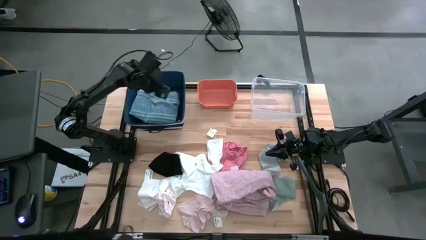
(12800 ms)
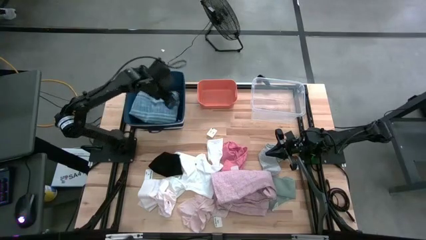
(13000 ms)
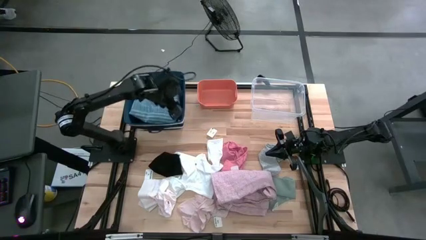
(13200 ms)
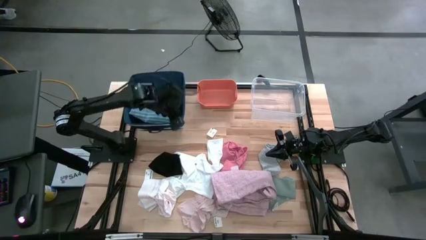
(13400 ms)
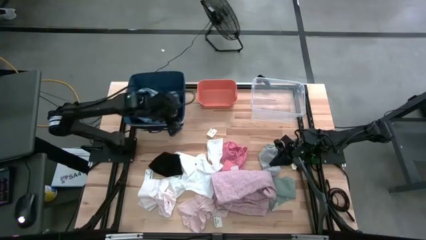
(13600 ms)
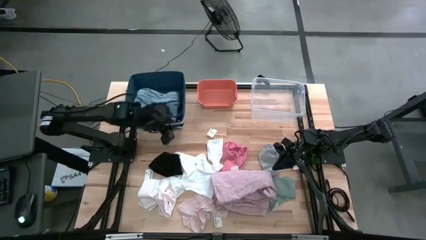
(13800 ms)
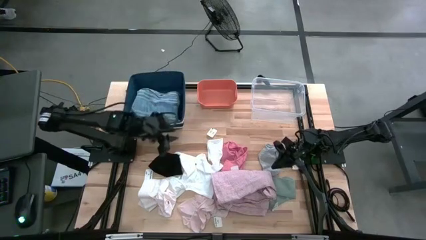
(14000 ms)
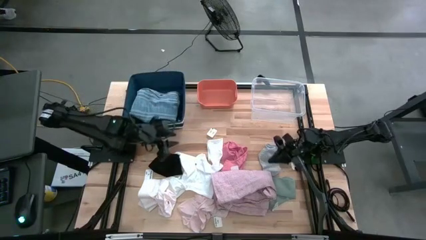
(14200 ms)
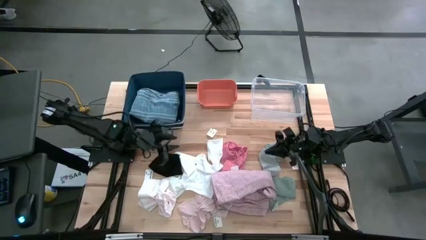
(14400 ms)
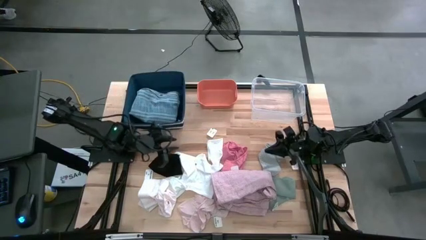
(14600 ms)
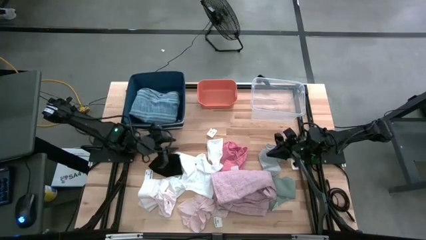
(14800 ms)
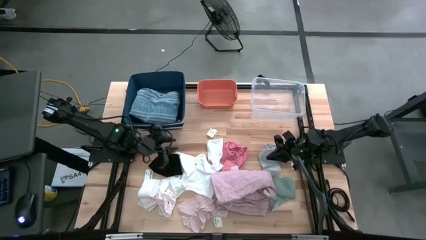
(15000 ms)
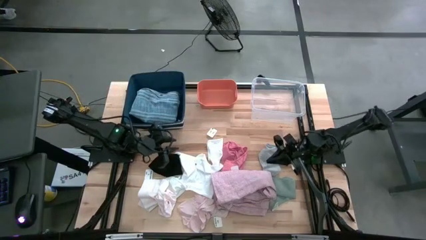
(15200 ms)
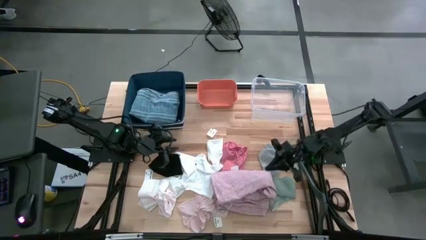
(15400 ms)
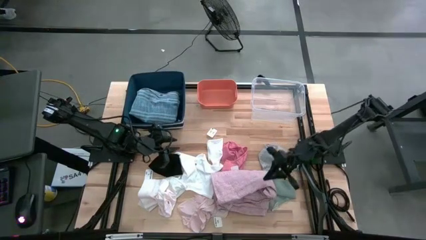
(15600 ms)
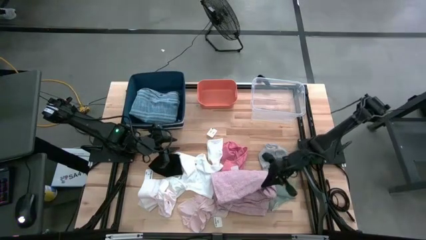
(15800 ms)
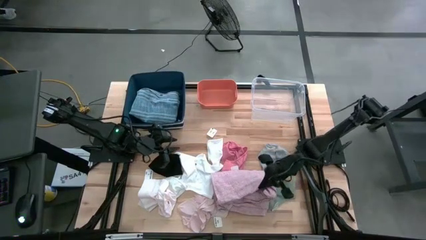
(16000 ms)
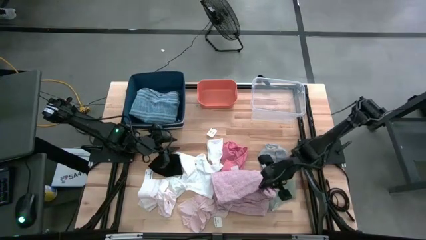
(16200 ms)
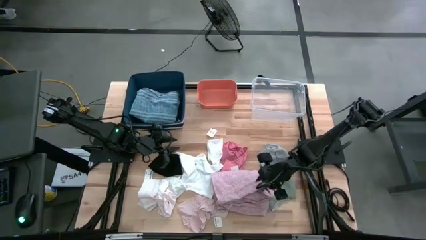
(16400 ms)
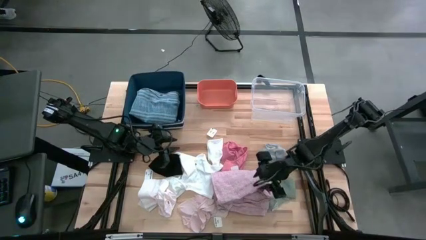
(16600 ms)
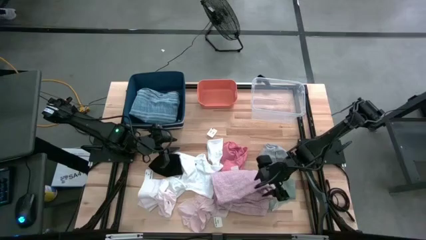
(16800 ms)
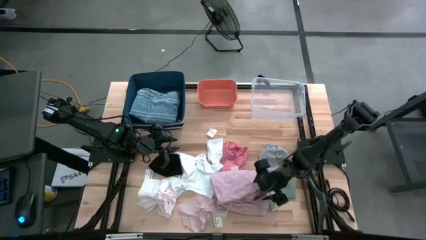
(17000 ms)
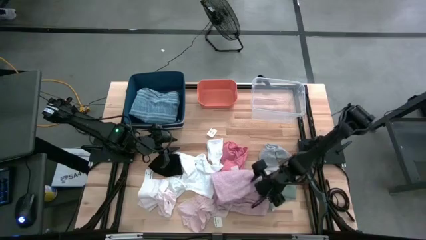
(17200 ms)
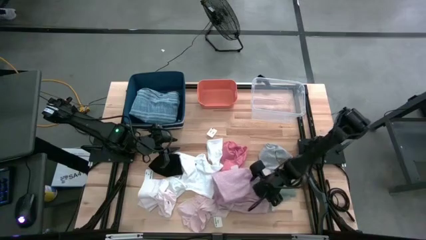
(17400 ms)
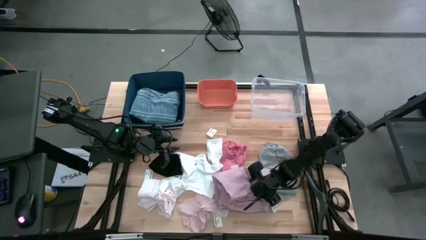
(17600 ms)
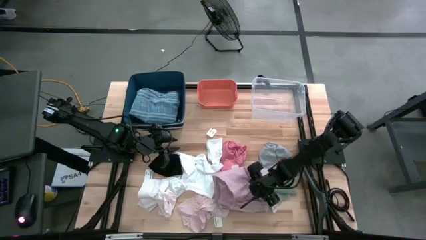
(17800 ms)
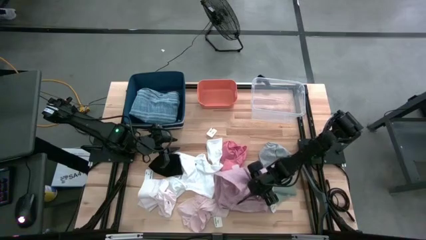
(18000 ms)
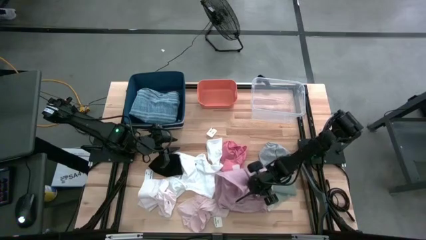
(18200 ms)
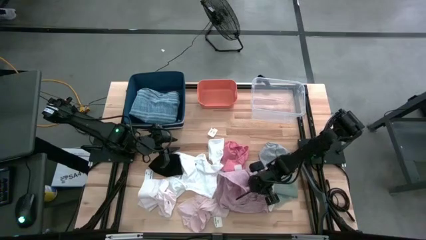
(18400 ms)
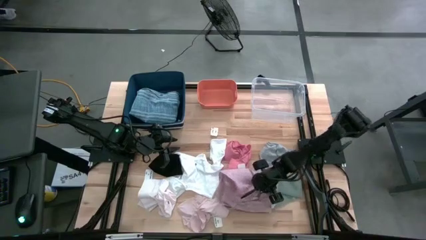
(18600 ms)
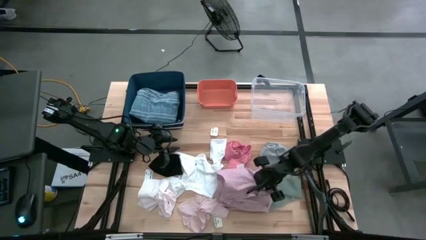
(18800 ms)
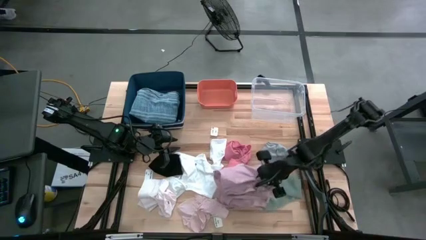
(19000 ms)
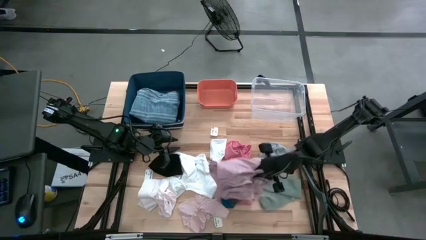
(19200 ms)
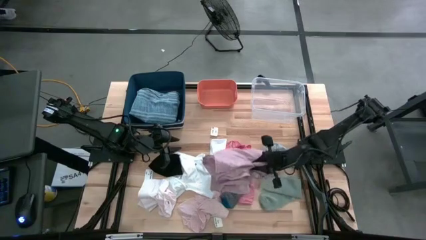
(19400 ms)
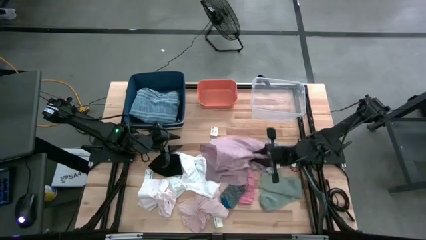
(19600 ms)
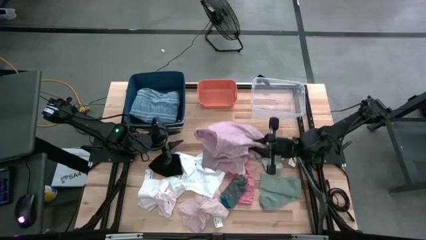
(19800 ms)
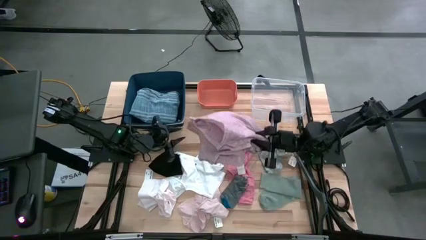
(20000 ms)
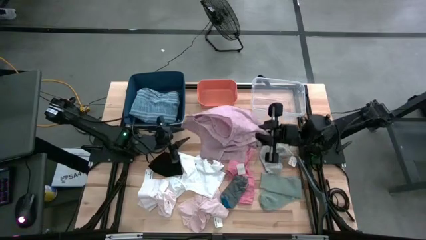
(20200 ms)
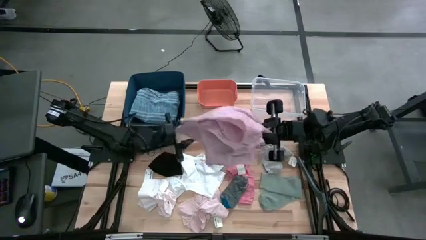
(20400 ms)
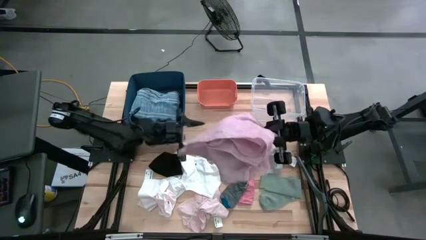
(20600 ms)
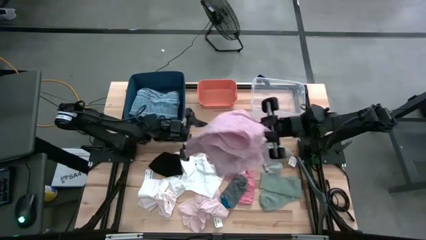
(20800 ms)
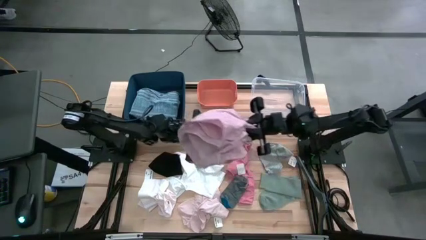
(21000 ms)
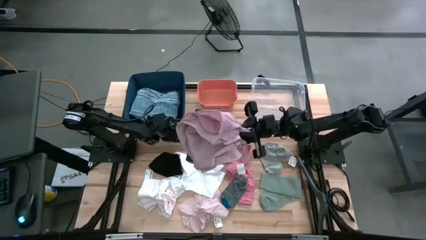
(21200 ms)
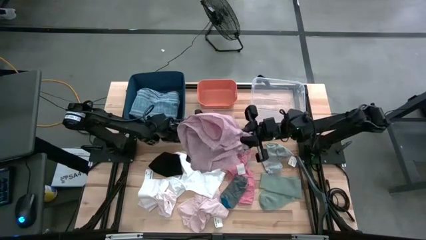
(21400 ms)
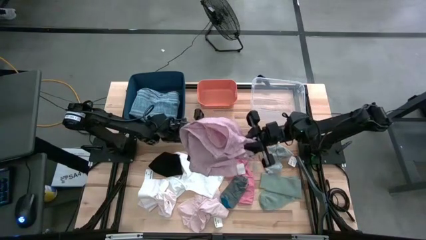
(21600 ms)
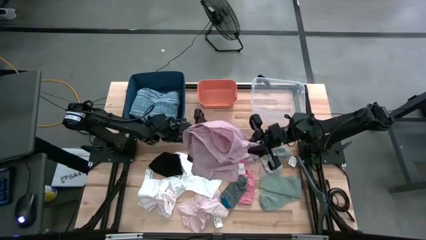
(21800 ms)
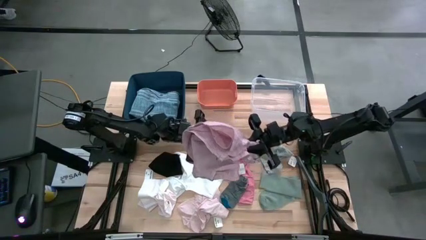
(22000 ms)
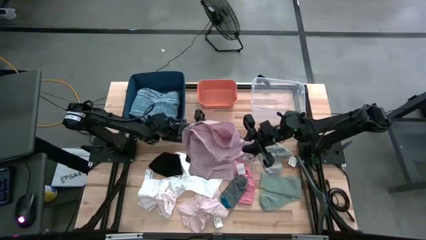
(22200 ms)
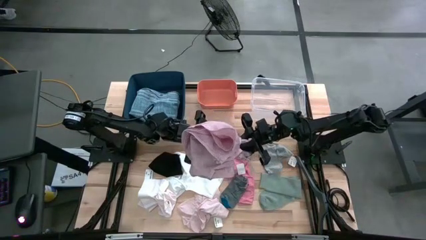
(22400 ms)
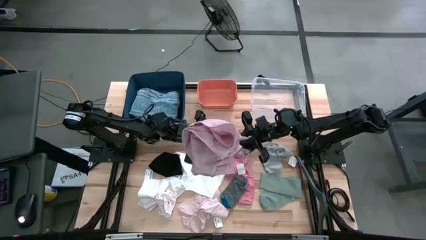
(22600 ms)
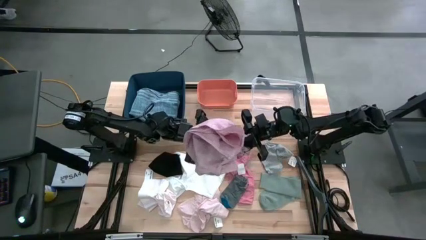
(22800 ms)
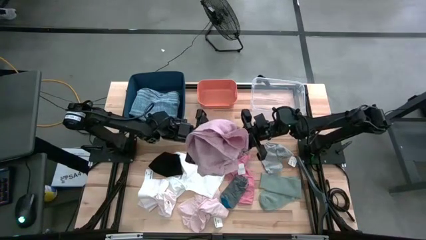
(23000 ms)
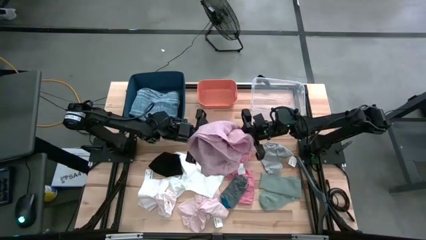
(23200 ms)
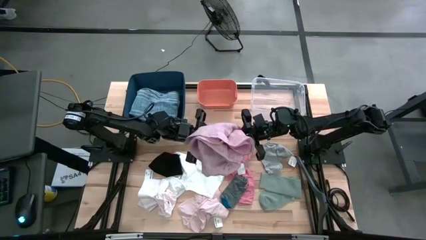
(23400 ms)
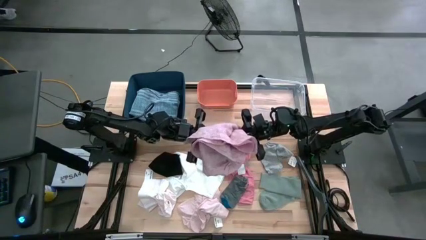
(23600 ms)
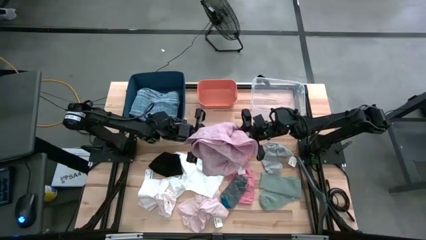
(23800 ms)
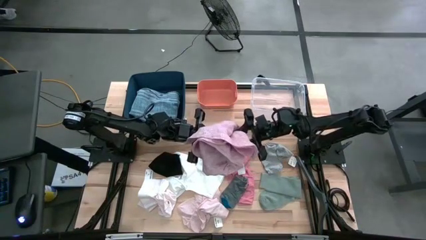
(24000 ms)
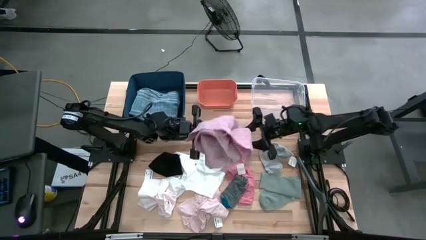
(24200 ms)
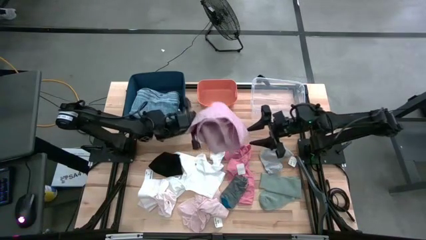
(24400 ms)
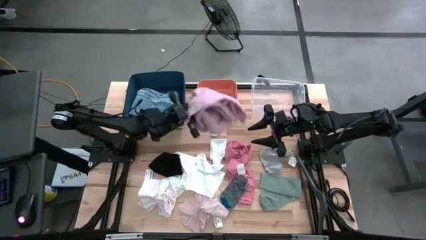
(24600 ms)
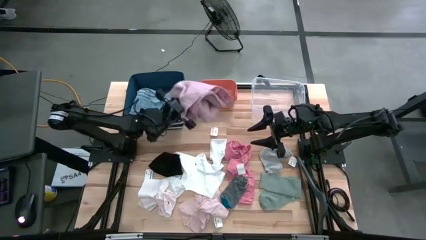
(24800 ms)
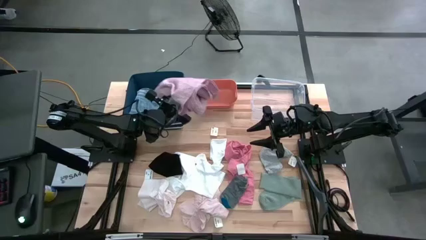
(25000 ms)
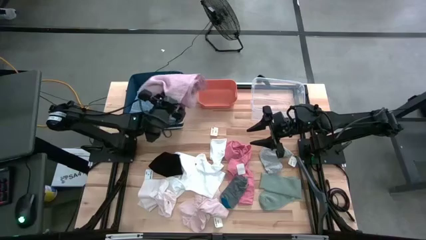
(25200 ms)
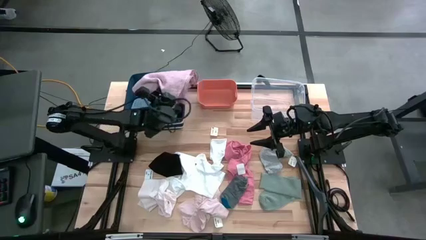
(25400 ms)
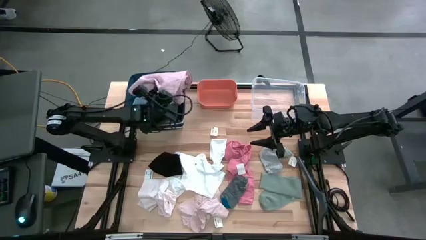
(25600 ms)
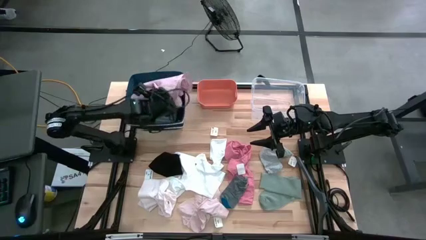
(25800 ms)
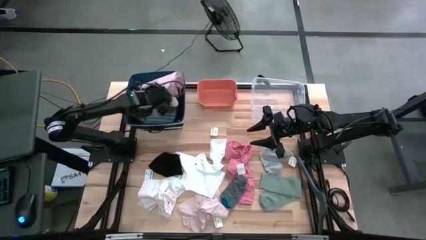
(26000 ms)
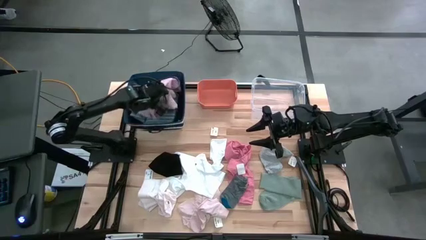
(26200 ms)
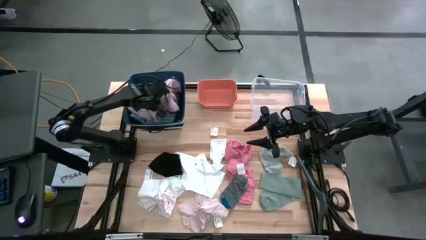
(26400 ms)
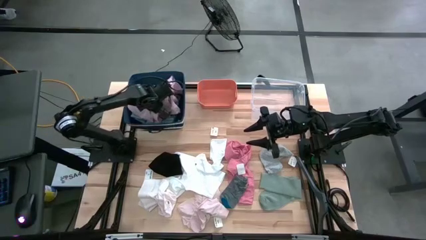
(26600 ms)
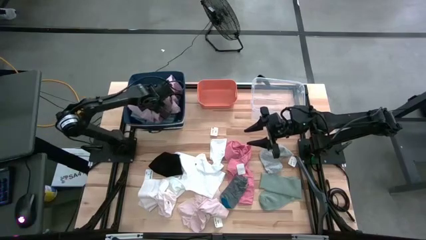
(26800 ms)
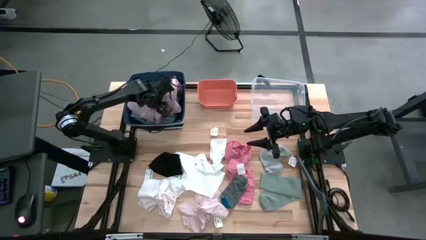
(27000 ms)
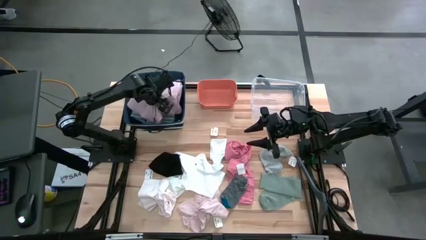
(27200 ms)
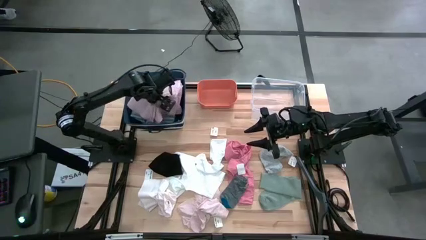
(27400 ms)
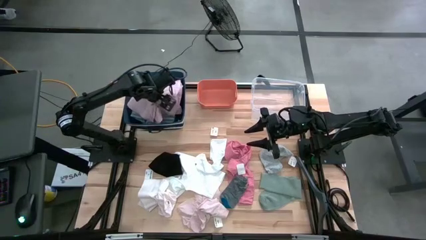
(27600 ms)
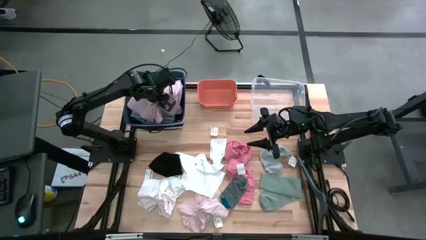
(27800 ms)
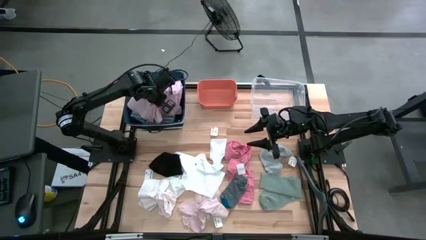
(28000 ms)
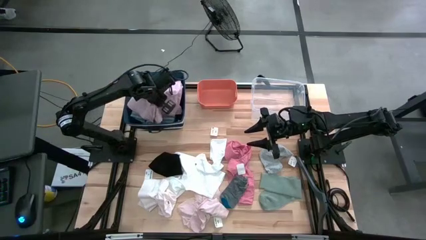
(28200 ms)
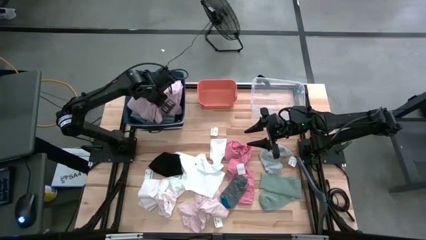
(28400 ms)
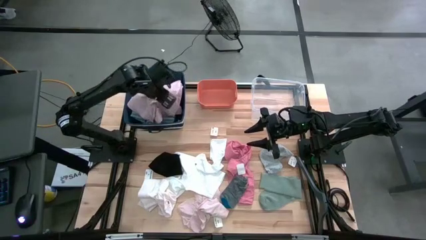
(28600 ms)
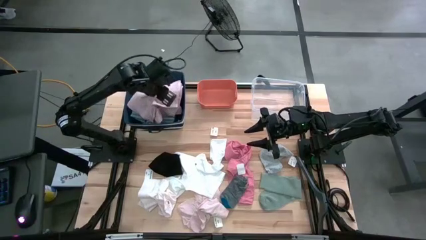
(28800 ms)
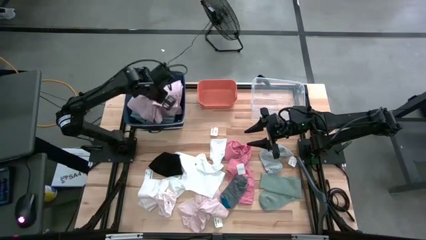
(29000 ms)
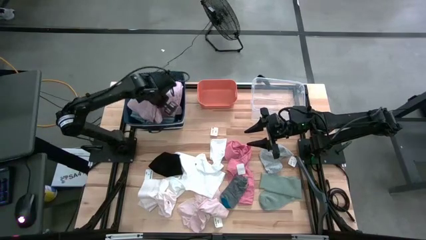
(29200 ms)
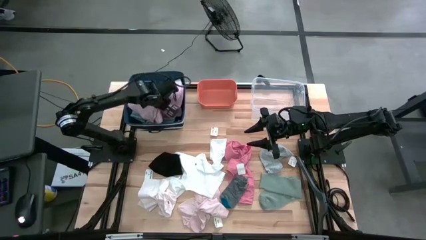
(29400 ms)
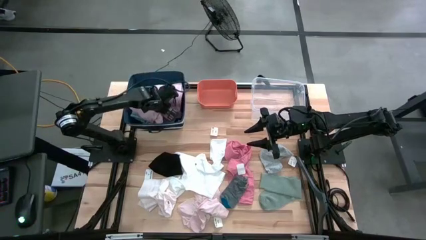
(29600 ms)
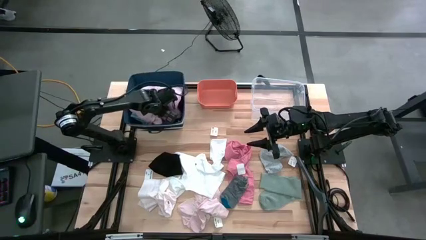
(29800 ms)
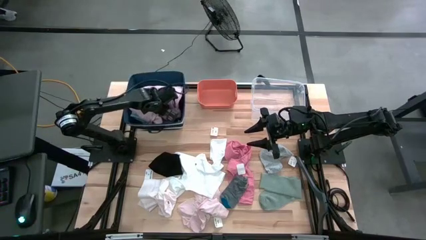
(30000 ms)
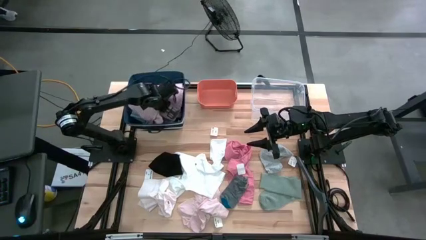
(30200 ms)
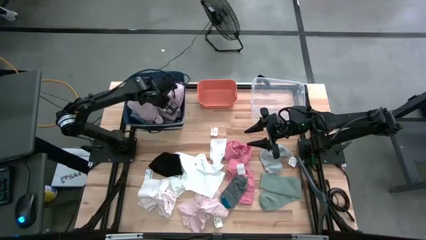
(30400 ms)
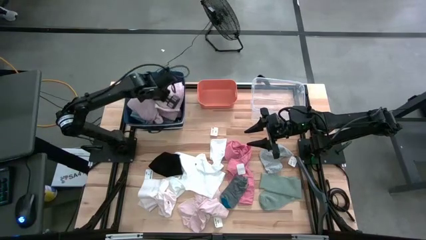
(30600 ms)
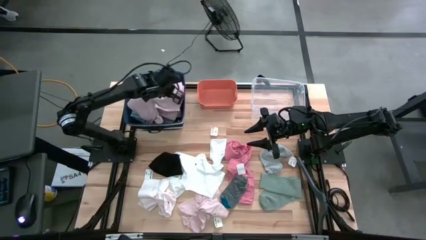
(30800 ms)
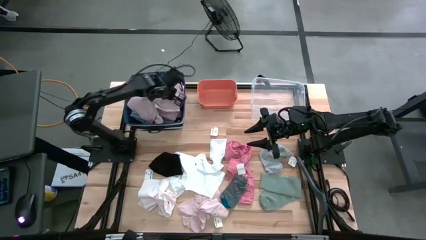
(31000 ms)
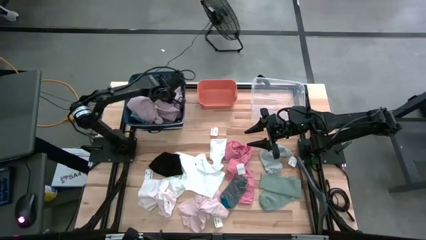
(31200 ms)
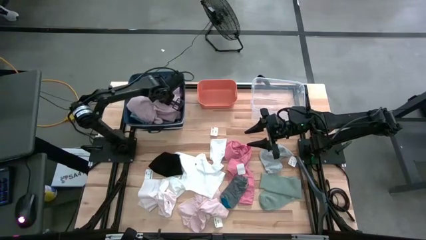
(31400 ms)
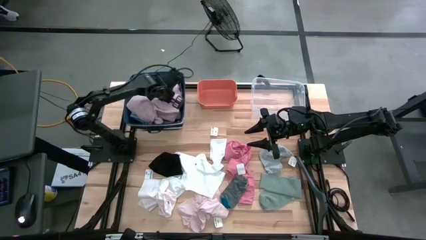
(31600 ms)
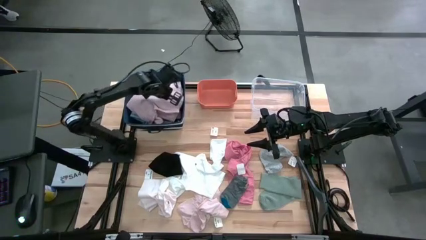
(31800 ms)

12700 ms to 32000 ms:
Task: Pick & Place Cloths
Put the pink shirt into the blue laundry organizer
